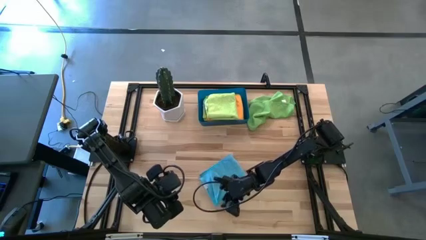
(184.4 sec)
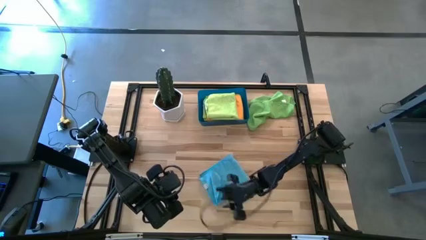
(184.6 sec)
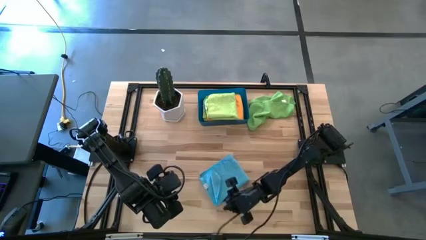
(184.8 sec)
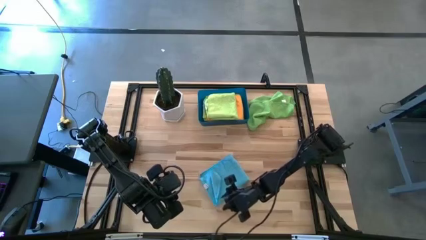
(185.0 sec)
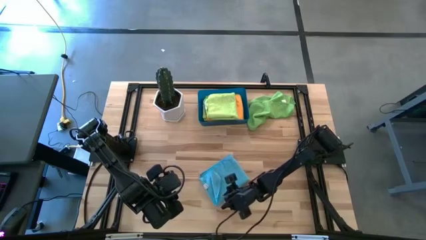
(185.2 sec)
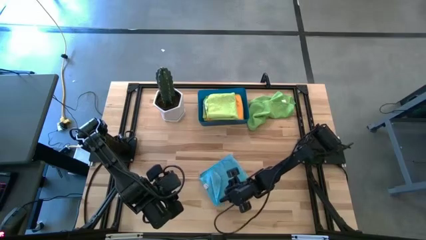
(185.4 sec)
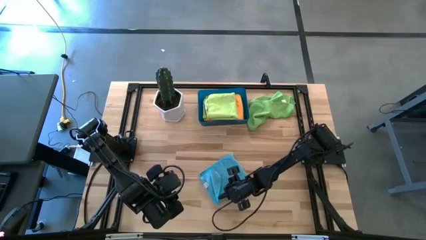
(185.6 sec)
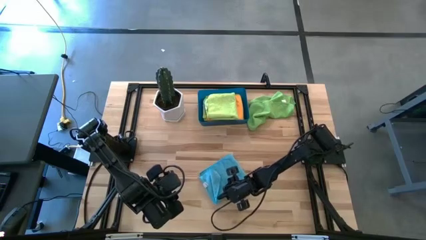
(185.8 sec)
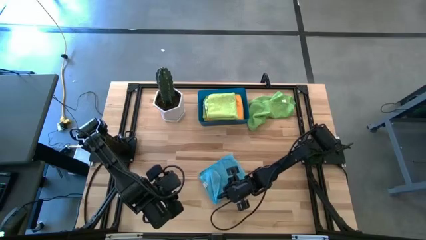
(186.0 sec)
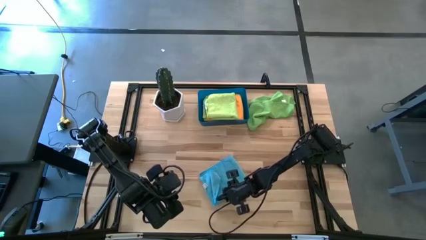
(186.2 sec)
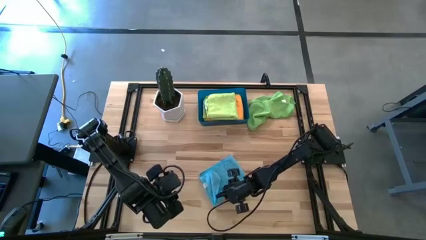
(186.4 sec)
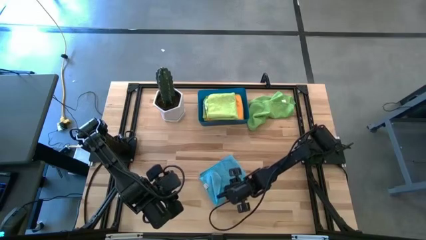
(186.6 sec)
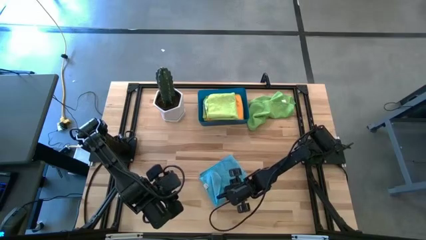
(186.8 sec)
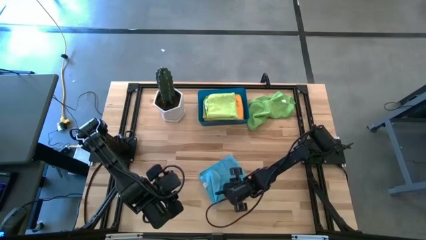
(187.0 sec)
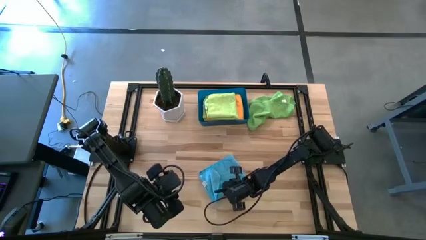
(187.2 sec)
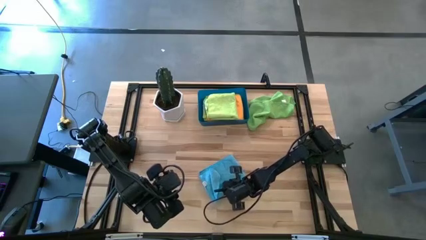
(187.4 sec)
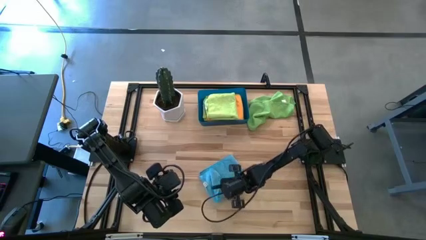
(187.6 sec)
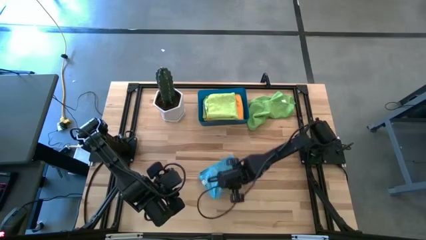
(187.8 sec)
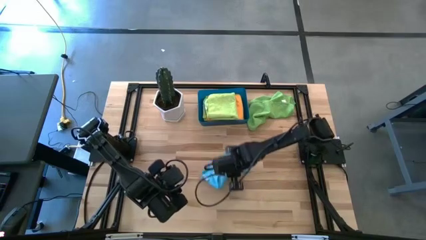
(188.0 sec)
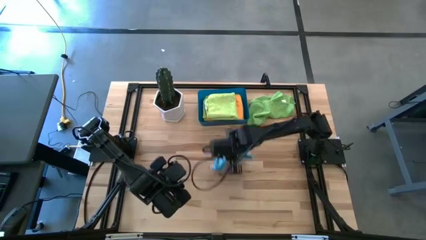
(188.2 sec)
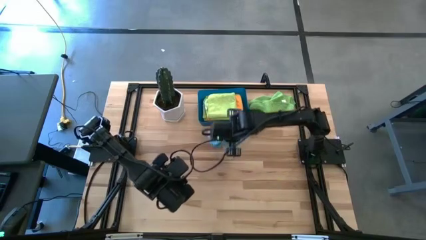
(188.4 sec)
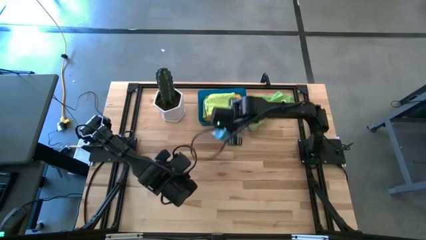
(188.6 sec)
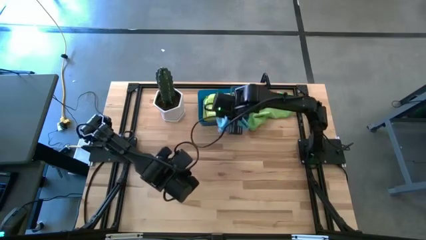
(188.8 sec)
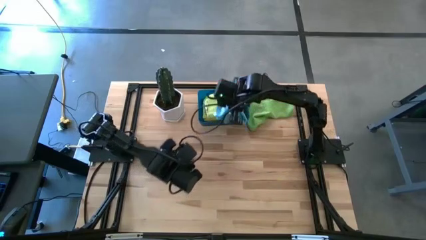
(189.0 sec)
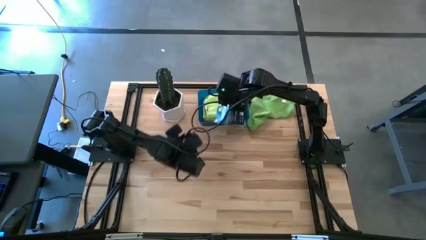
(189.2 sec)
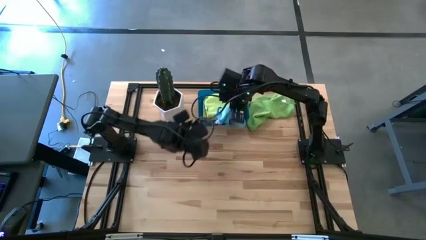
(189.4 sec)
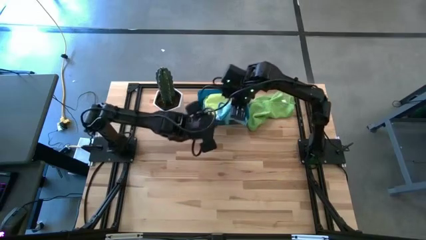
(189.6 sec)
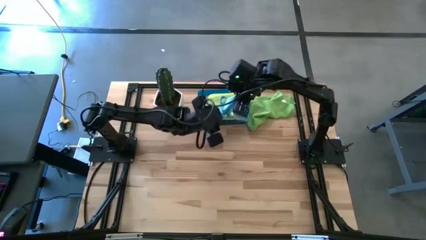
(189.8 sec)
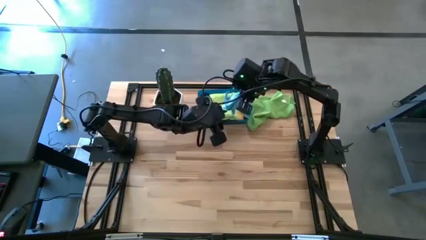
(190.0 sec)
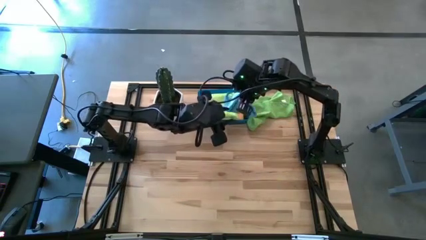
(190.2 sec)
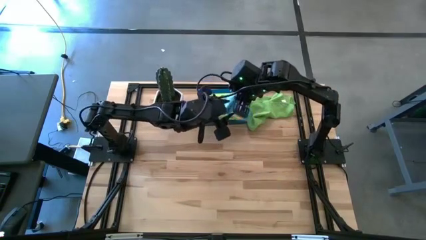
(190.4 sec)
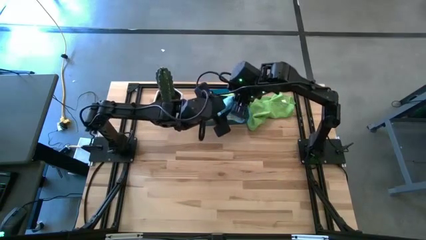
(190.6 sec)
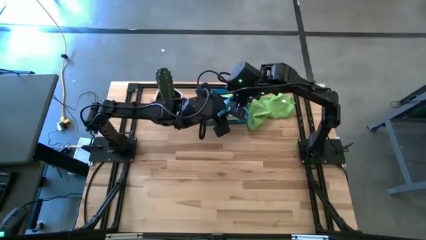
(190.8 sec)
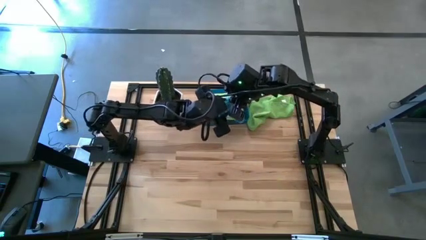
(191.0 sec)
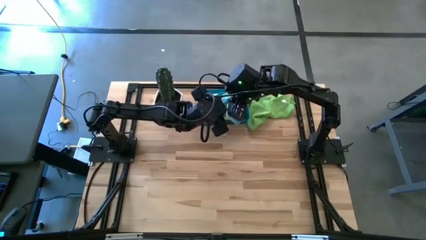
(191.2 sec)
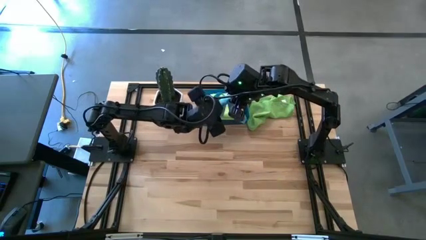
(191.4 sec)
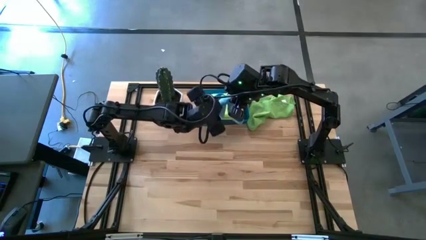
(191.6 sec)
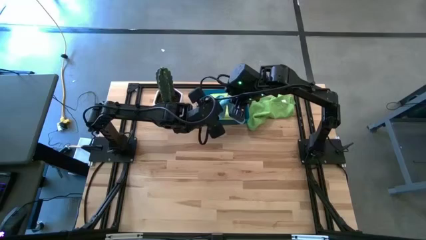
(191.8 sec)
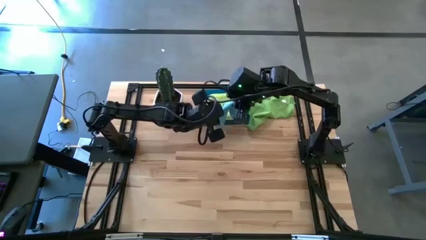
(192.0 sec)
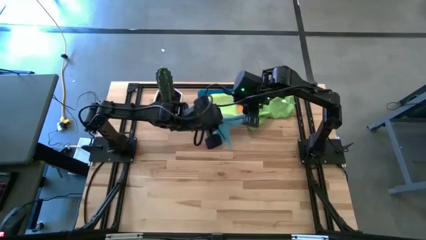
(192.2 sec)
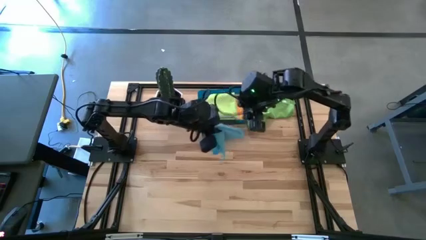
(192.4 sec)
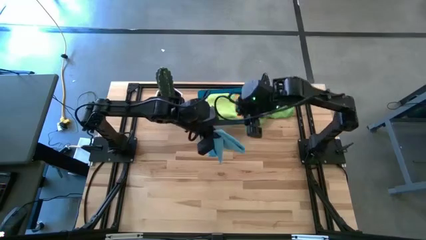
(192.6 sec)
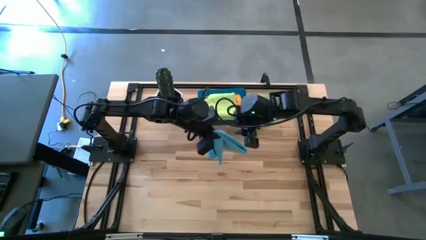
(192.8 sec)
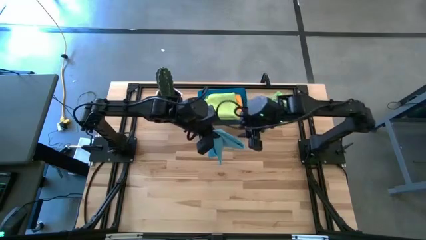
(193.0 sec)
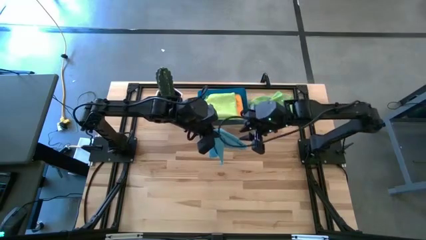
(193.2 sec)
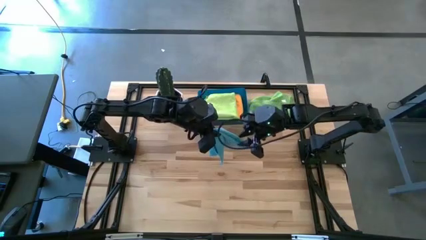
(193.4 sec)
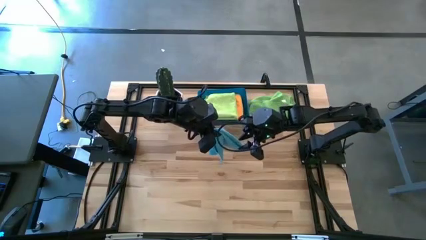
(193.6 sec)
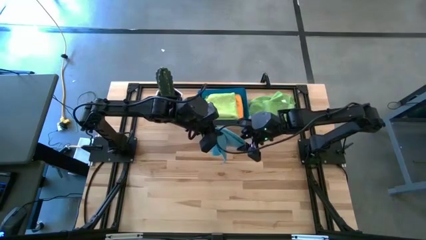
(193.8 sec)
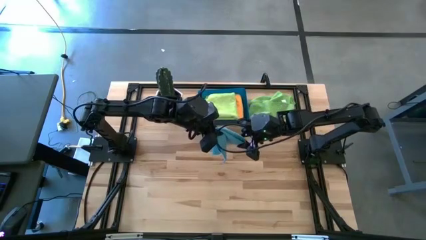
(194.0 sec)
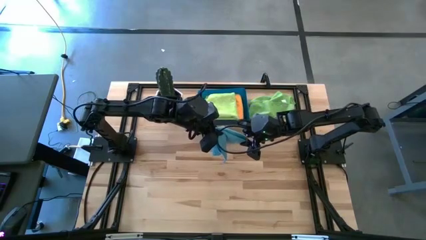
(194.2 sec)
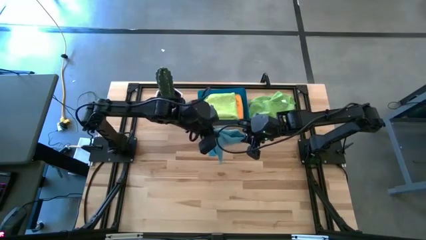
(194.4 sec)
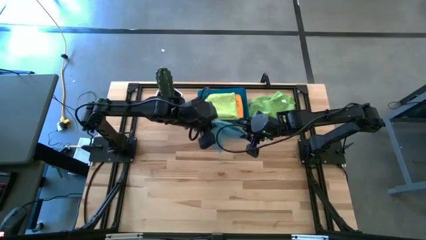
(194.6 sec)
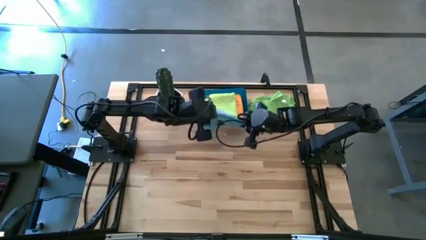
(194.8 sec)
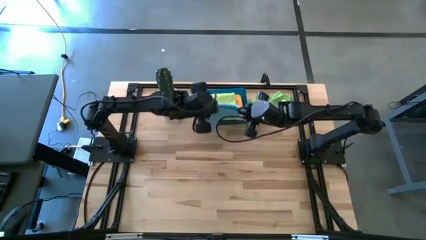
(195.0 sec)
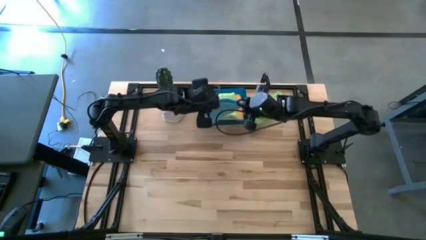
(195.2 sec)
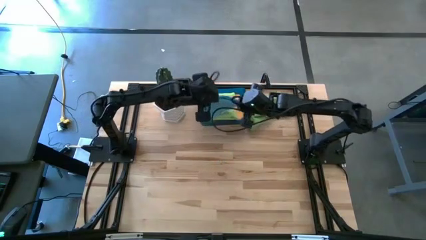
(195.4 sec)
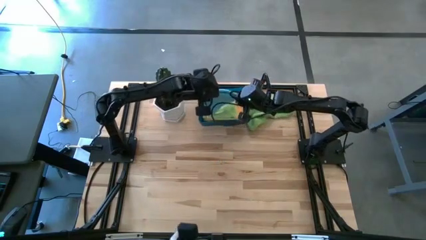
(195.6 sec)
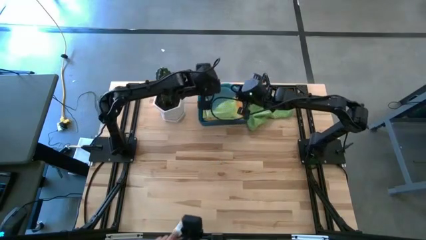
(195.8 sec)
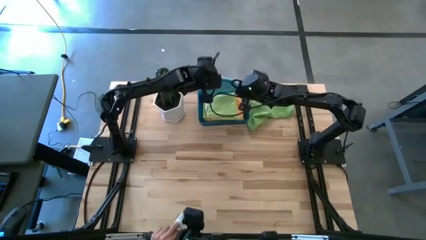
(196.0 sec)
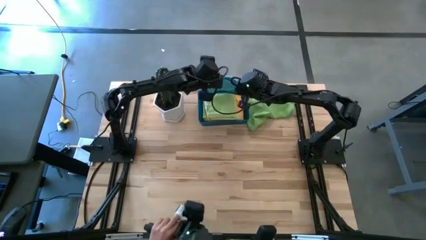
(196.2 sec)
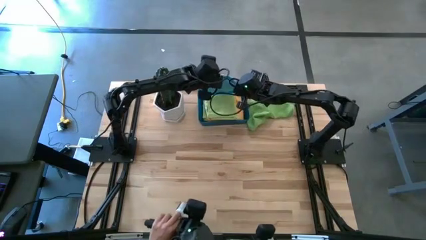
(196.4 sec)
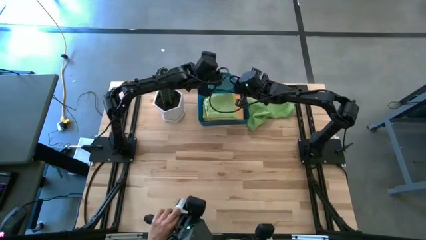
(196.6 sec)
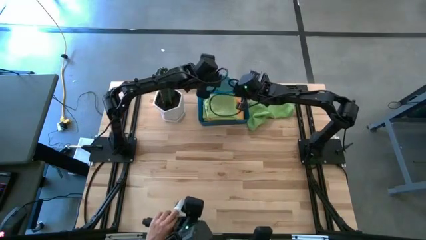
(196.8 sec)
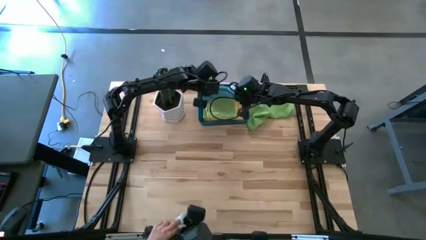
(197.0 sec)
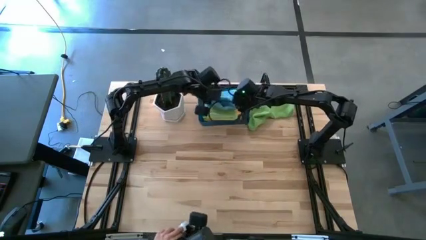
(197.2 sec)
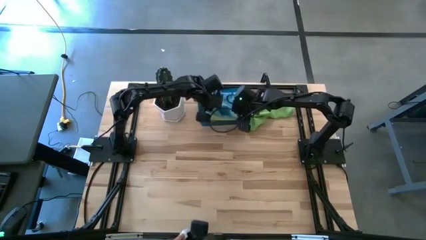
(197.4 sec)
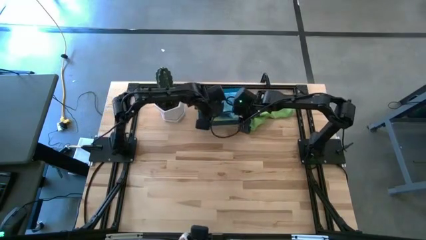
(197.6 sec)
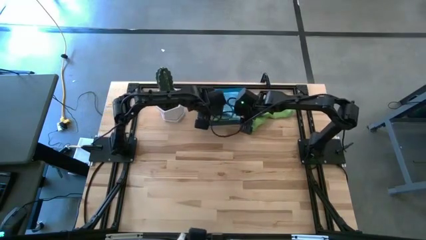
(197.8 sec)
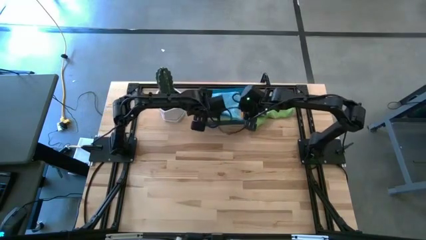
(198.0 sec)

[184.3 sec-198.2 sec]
Task: Fold microfiber towels
Stack the blue microfiber towel on top of the green microfiber towel

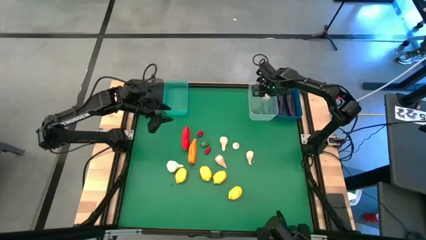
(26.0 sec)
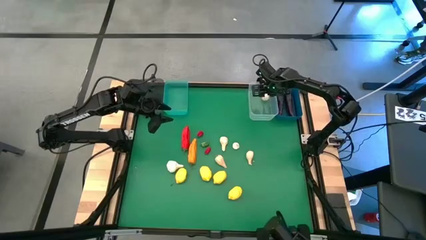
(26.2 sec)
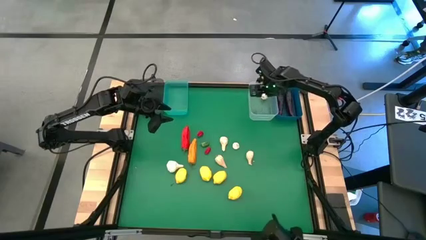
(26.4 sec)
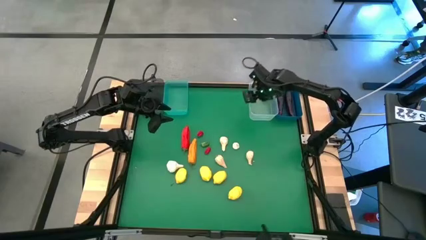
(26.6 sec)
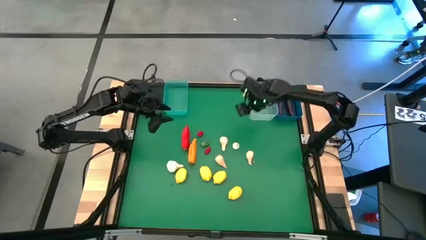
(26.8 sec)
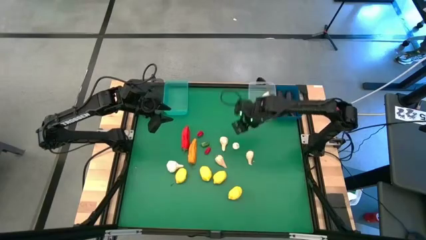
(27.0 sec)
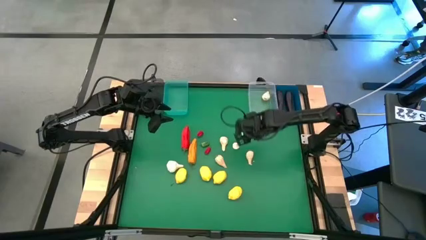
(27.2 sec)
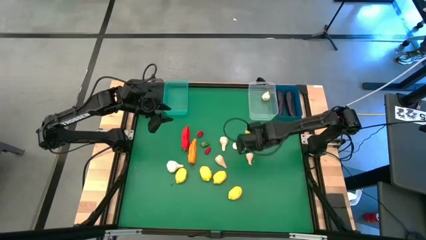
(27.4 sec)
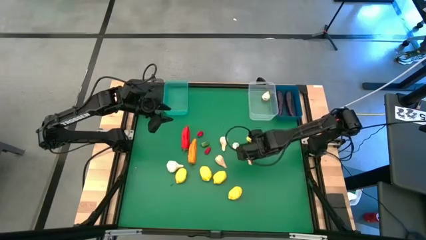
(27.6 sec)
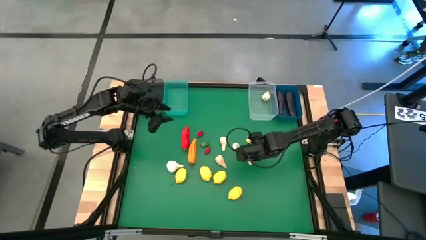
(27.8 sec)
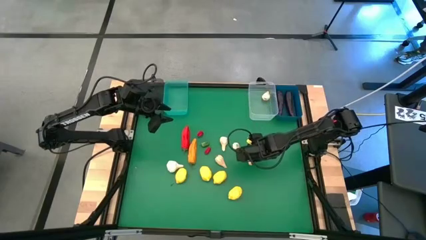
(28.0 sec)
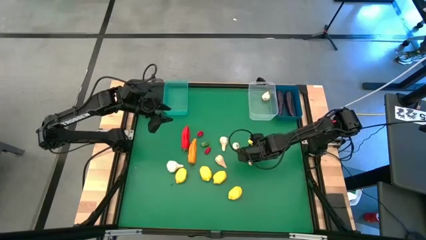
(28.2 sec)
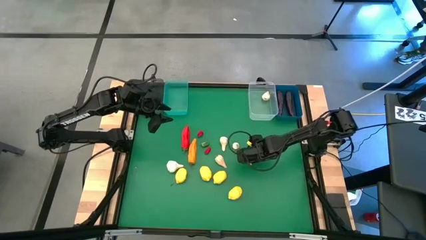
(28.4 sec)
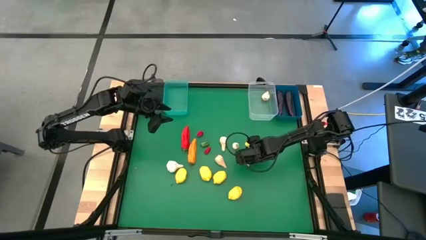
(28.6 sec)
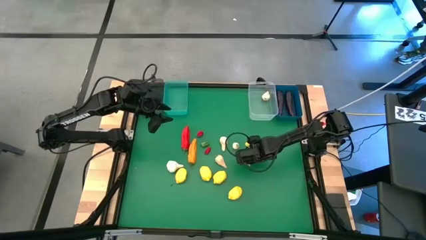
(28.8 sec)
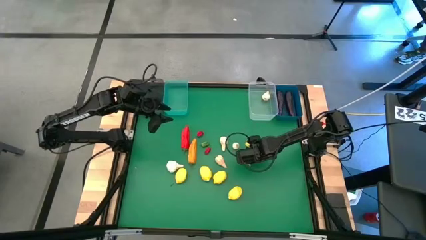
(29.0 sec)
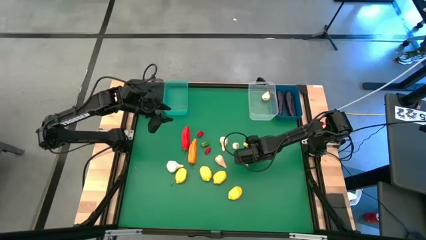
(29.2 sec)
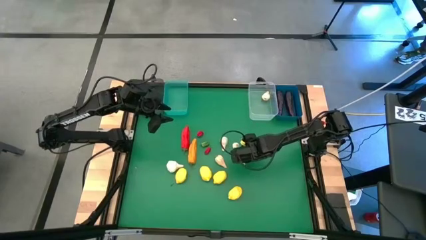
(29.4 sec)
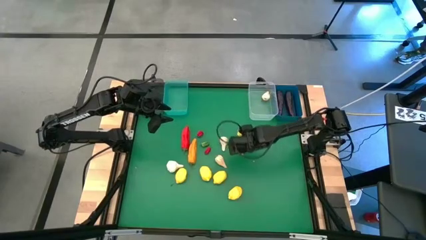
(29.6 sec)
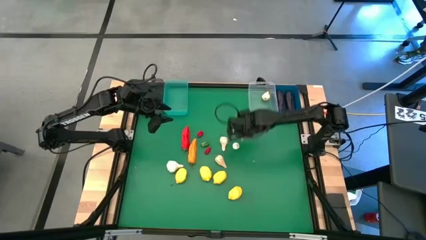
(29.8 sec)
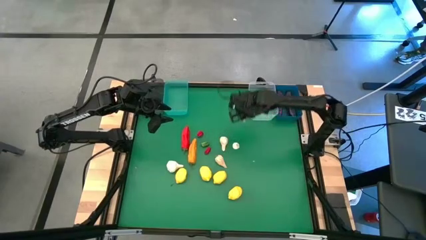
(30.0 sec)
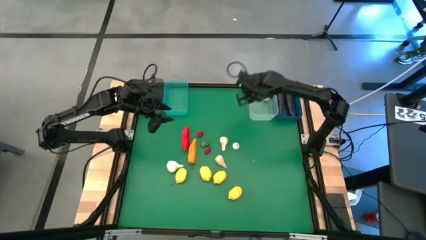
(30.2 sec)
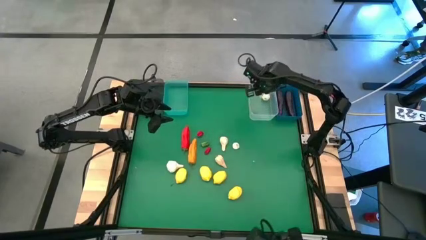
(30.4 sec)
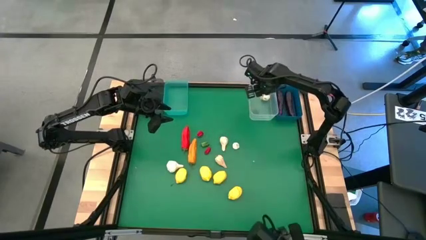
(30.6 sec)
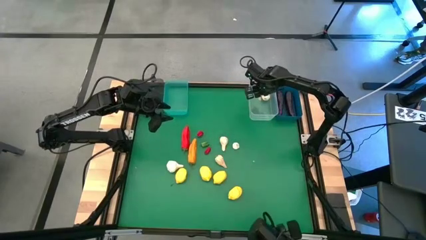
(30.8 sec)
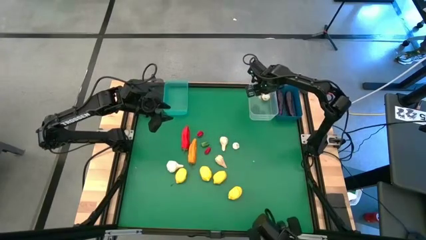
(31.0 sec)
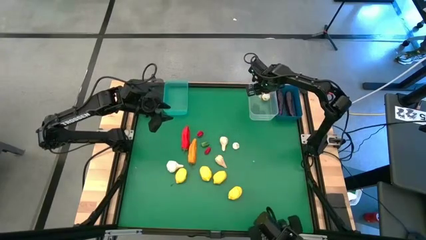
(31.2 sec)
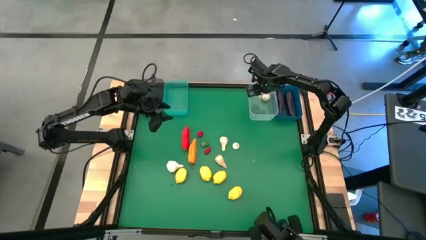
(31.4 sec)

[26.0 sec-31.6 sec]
Task: Sort produce into baskets
Put the garlic into the transparent bin
